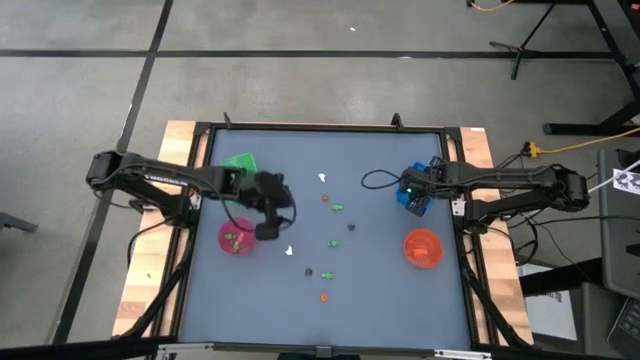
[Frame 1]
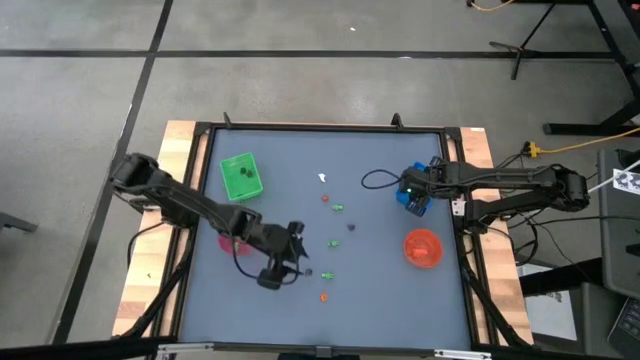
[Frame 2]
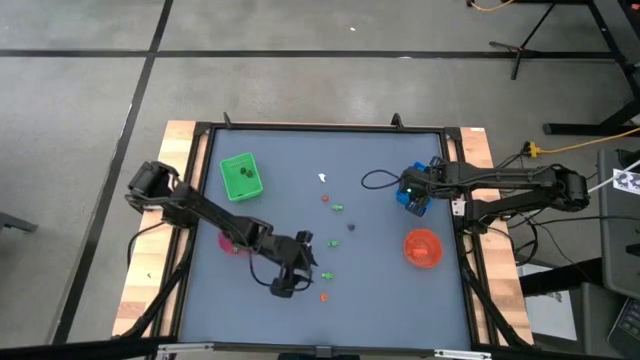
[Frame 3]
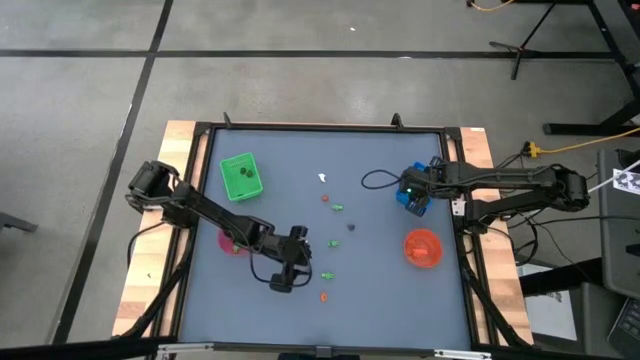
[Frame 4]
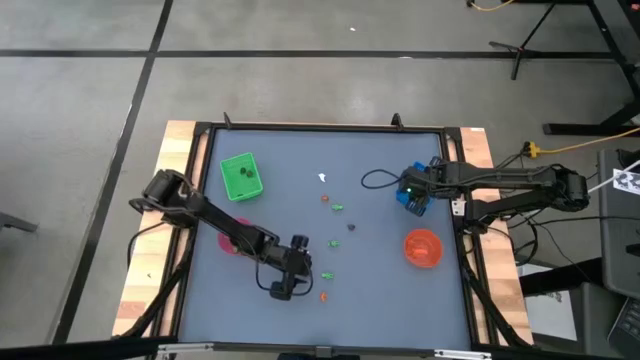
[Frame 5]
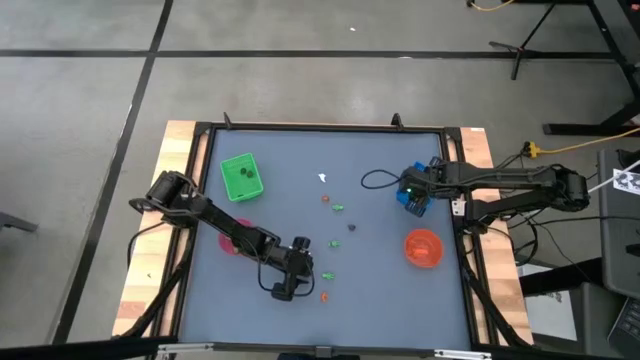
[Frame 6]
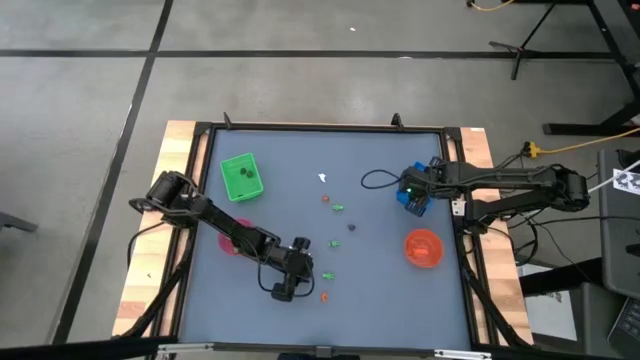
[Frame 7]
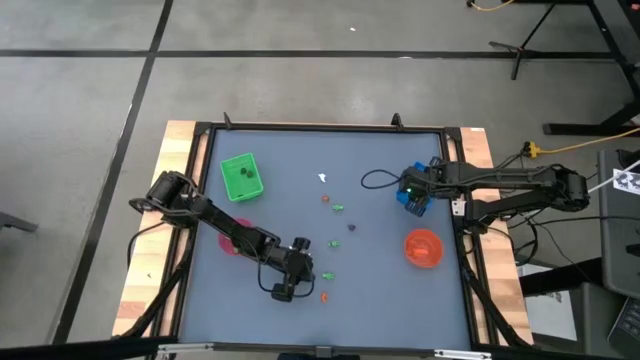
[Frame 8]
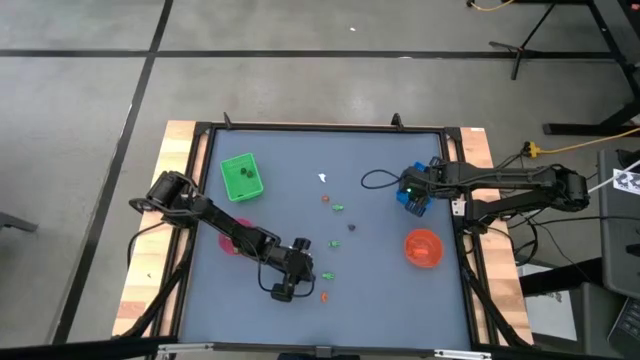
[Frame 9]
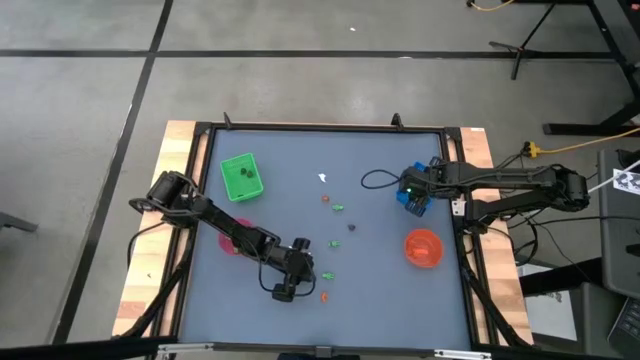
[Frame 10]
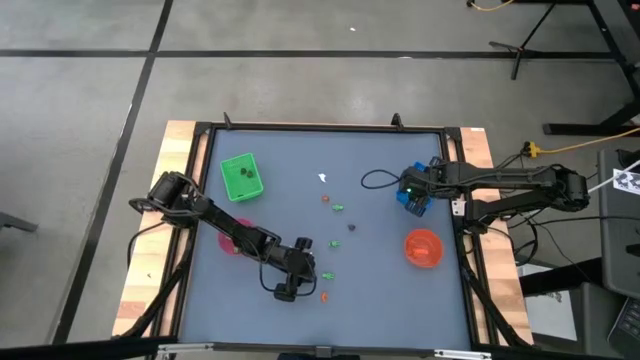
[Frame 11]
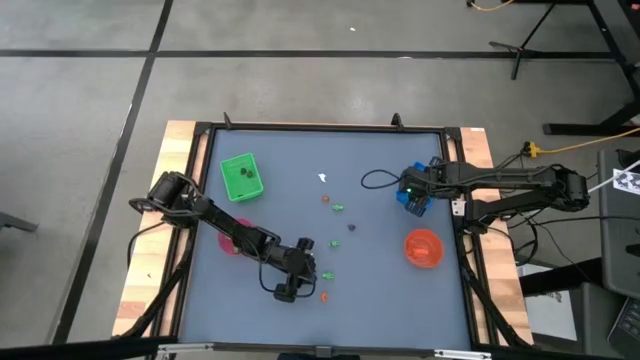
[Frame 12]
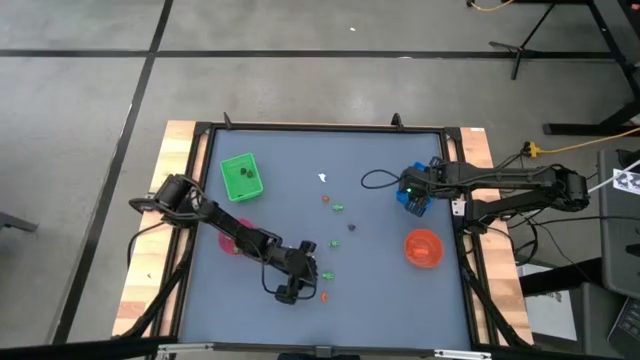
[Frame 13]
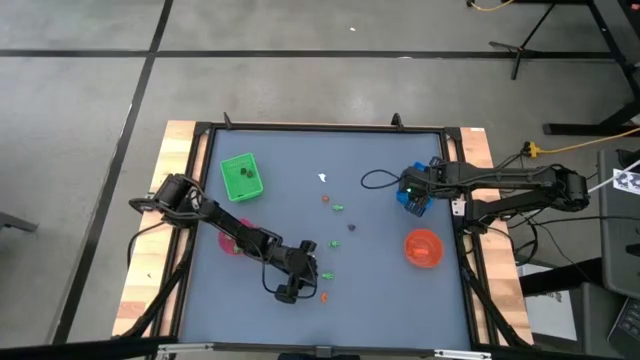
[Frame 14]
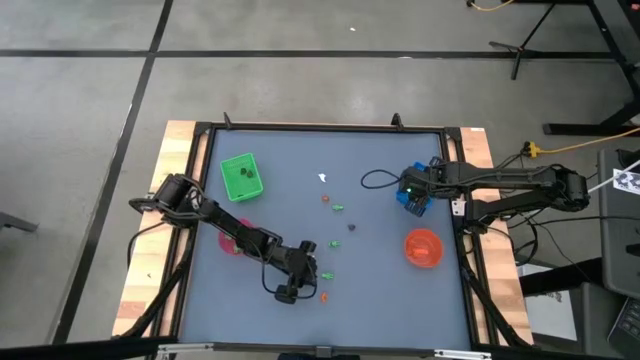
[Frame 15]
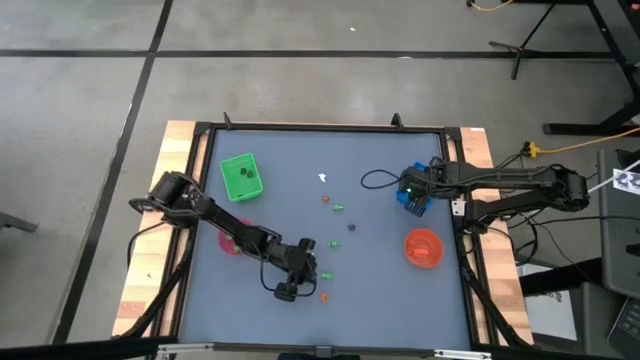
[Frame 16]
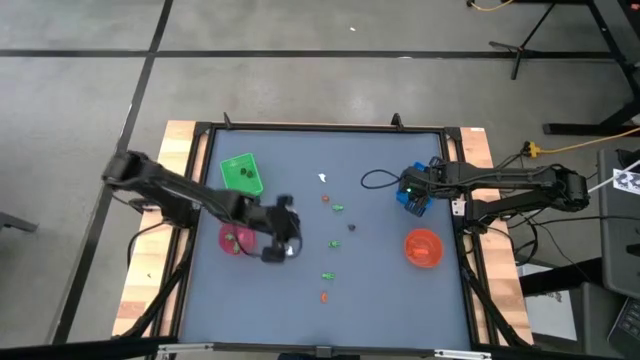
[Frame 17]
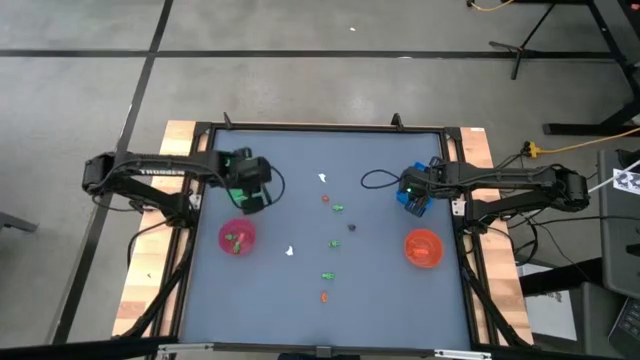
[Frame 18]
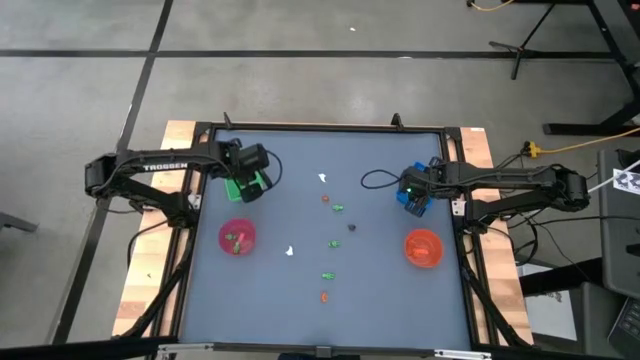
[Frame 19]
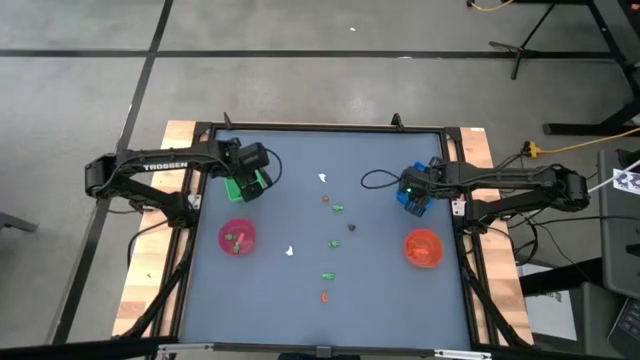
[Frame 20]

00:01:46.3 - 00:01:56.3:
Task: Sort Halloween decoration
Put the small black skull toy into the green basket

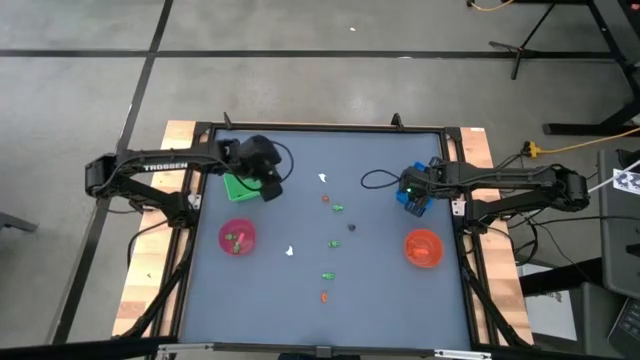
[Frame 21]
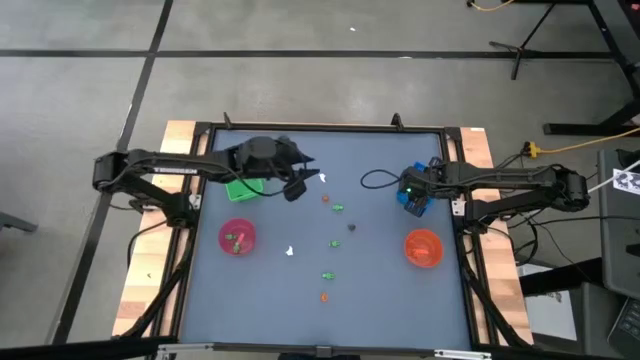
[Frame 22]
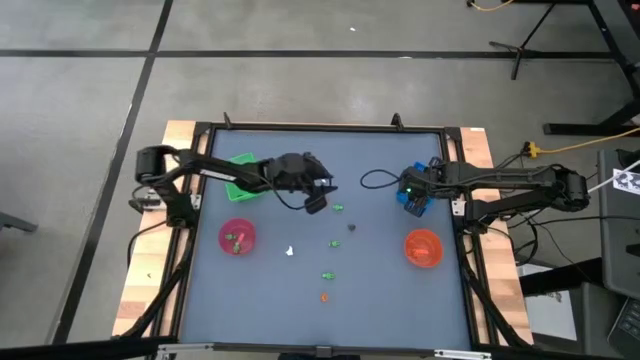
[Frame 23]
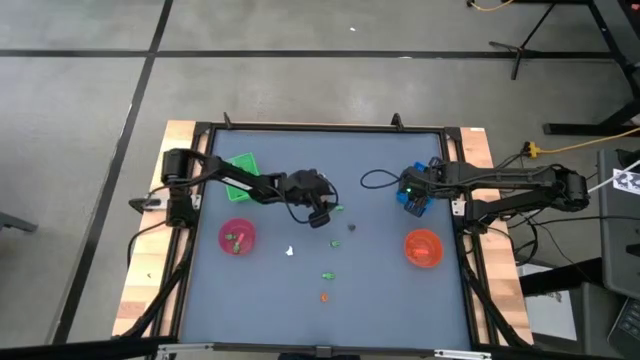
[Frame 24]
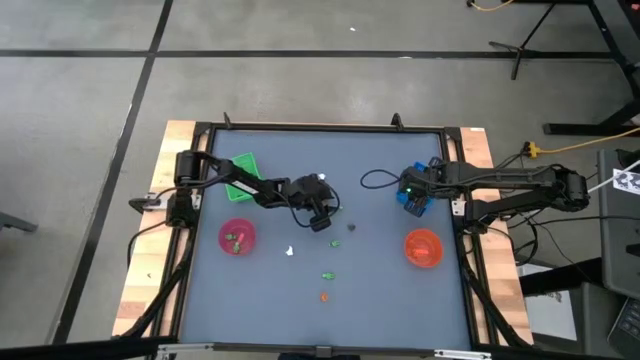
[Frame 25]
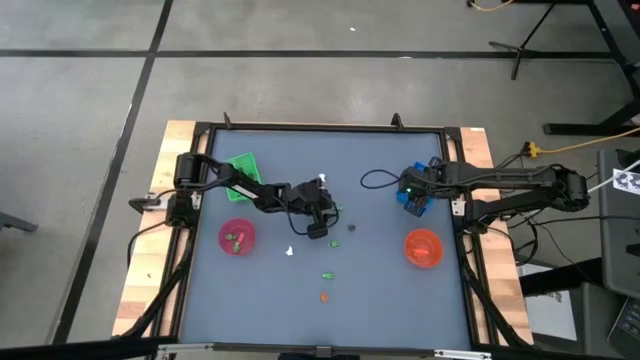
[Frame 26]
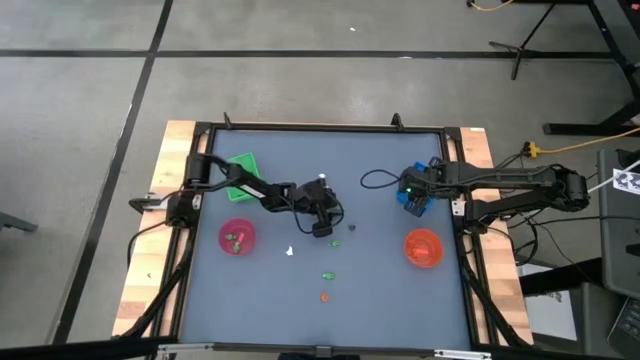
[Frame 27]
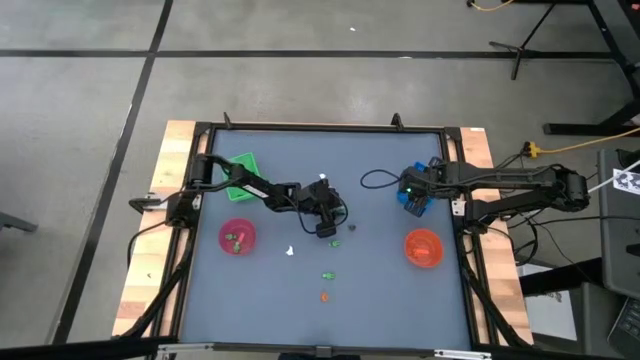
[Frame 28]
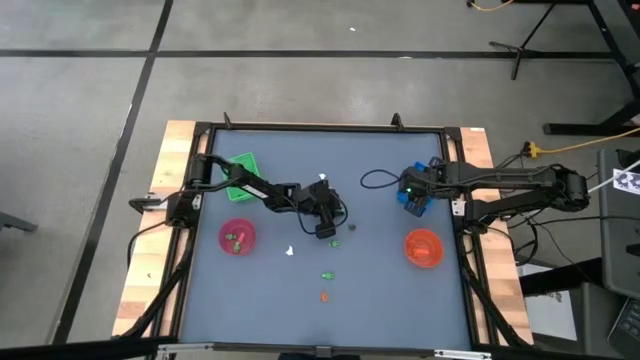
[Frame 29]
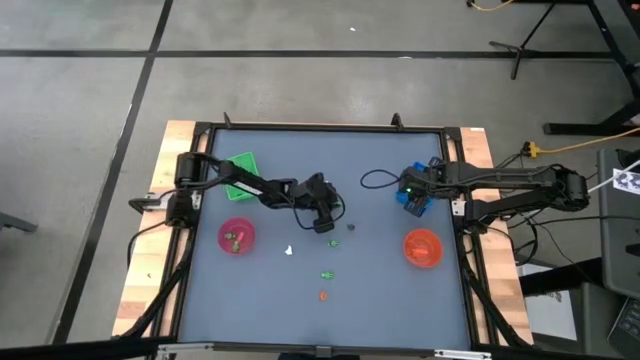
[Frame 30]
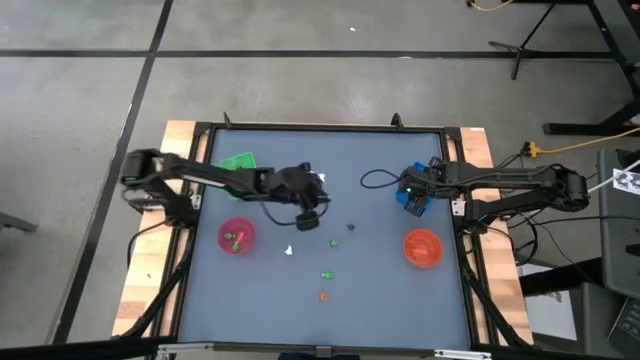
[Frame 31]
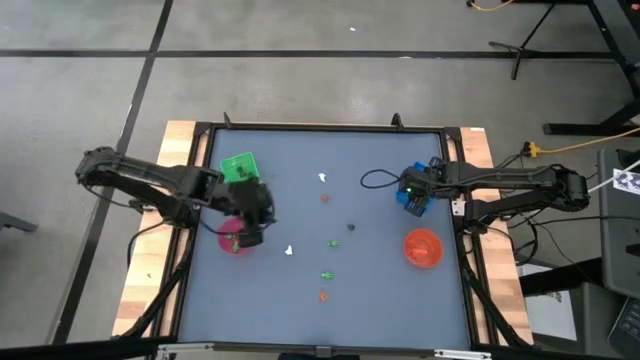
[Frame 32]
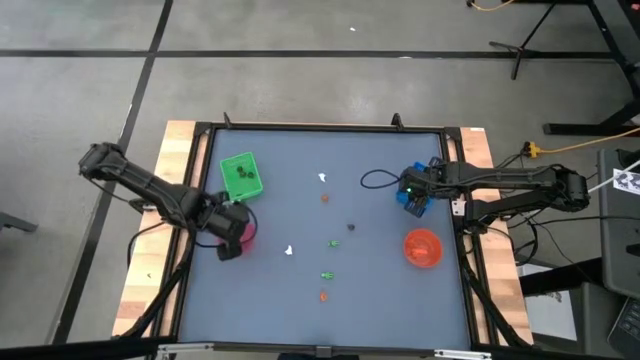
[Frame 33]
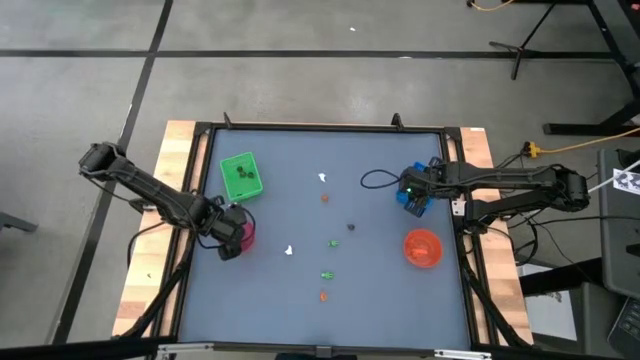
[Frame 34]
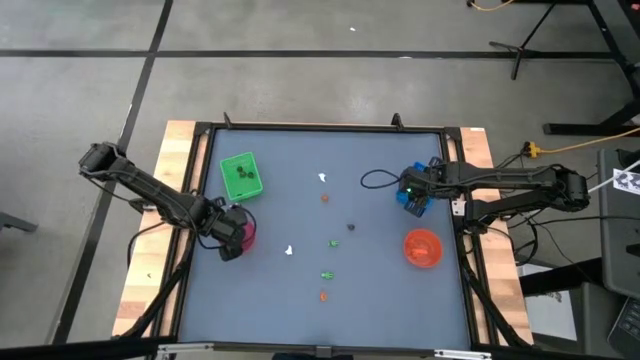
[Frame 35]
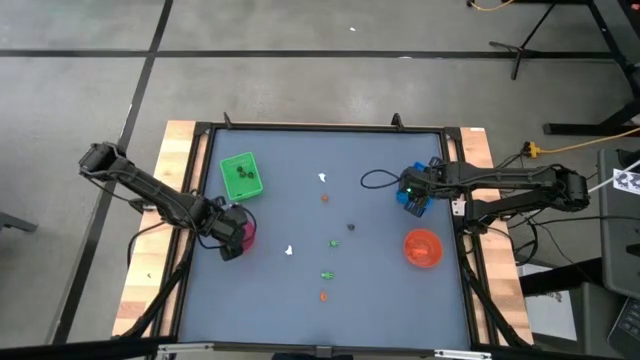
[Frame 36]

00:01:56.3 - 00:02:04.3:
Put the small green skeleton toy into the transparent red bowl

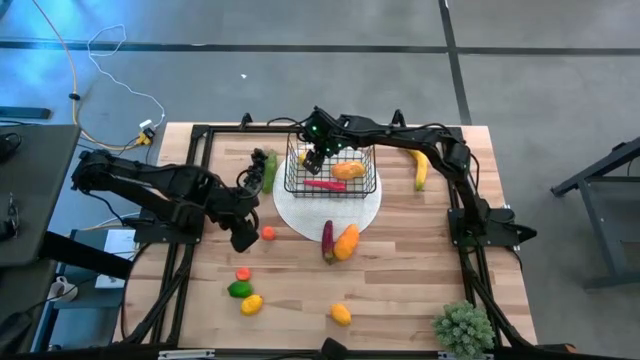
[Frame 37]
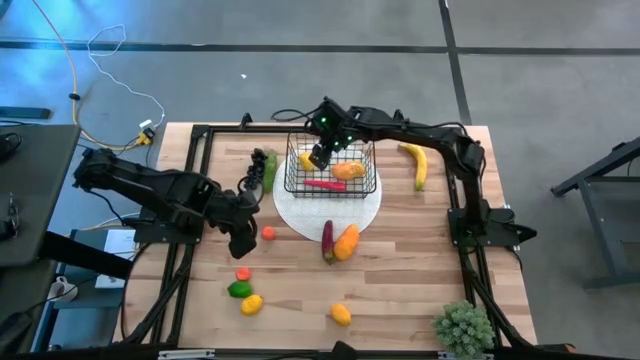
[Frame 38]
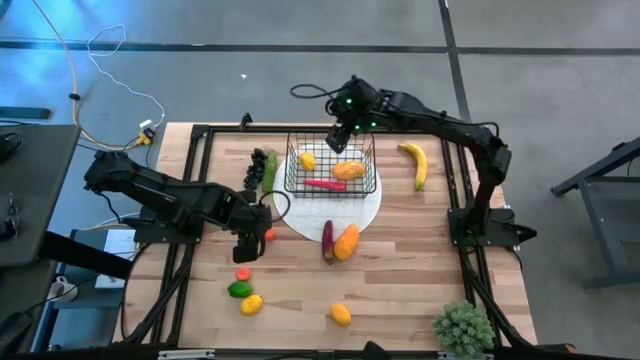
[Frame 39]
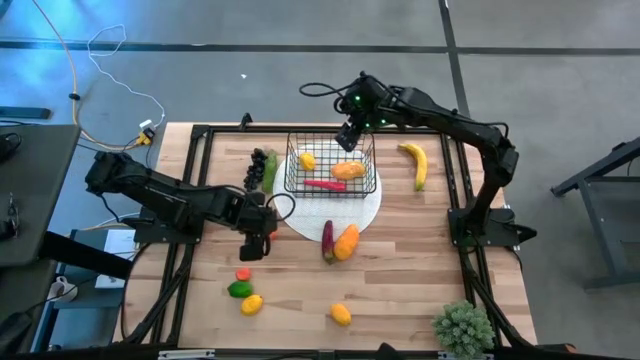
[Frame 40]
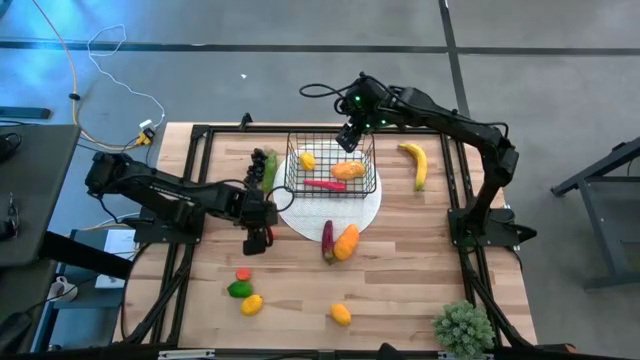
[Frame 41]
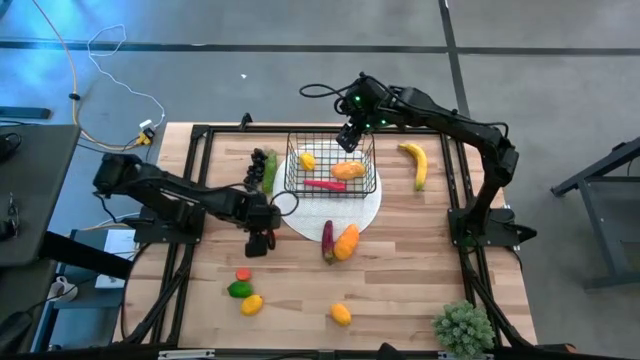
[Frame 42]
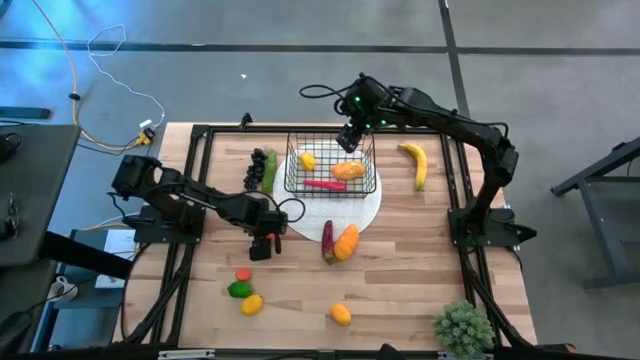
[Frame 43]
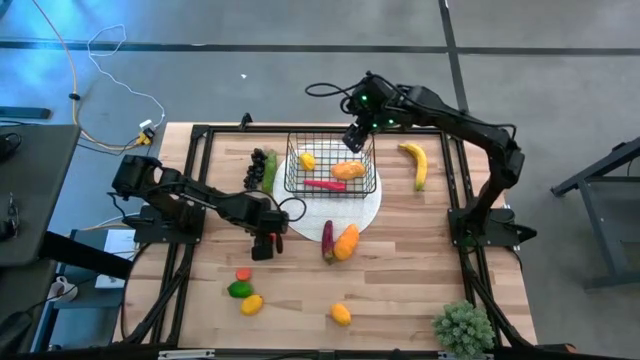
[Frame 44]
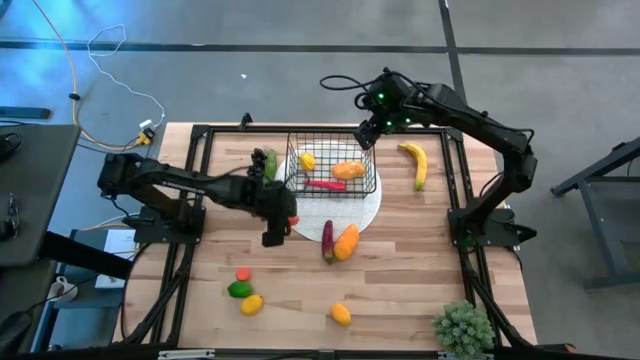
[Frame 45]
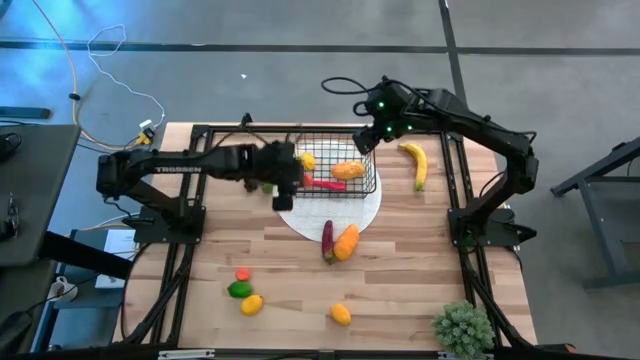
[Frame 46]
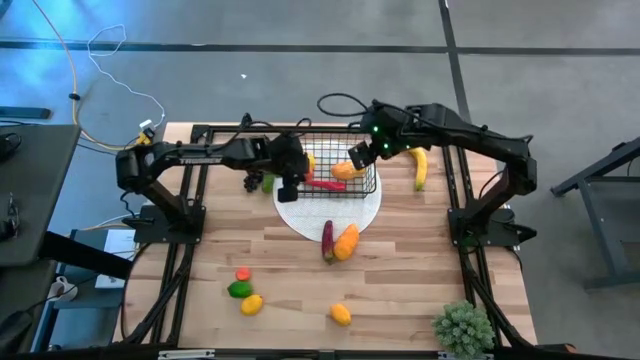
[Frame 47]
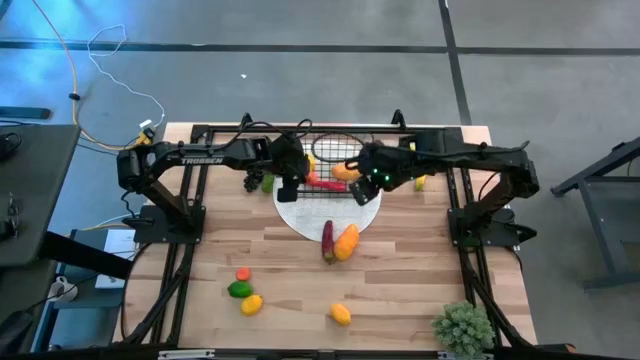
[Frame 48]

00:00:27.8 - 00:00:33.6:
Task: Build produce basket
Put the top orange into the wire basket
